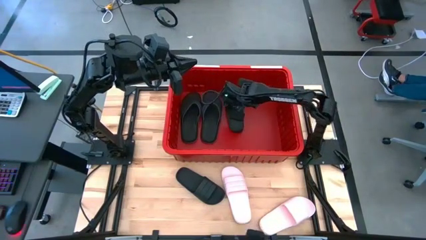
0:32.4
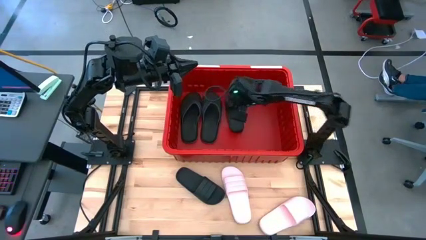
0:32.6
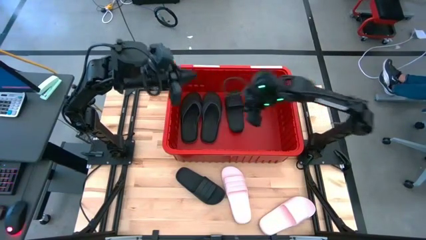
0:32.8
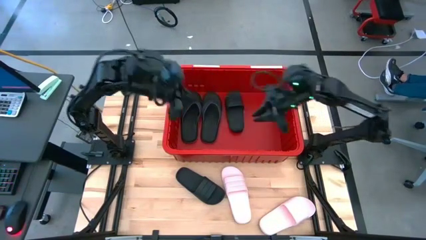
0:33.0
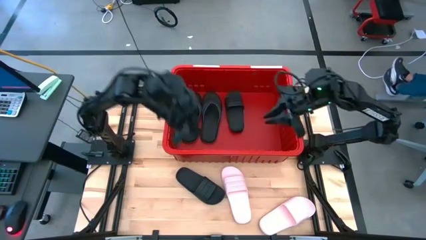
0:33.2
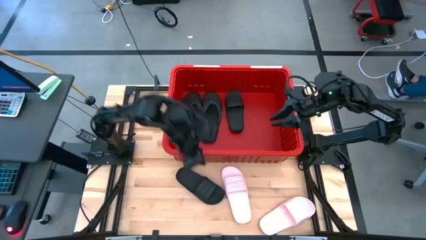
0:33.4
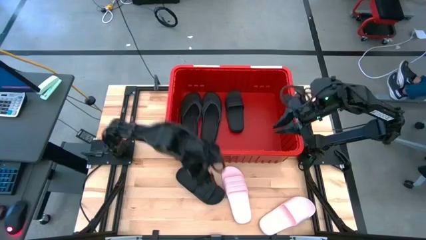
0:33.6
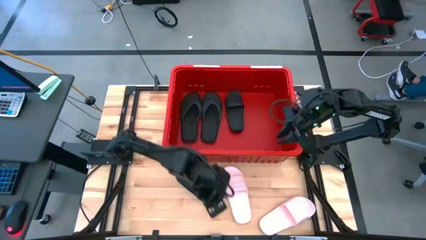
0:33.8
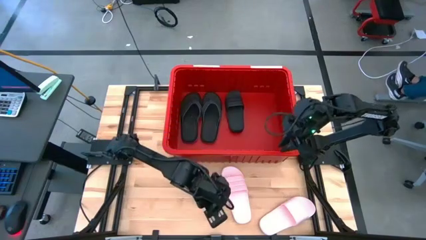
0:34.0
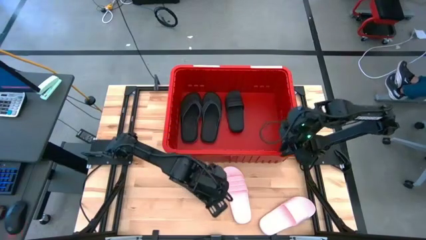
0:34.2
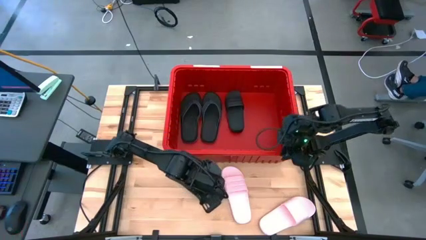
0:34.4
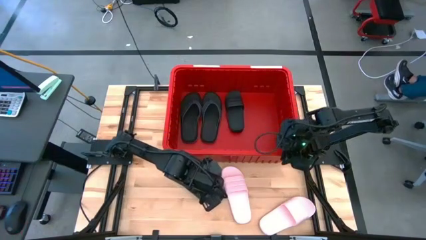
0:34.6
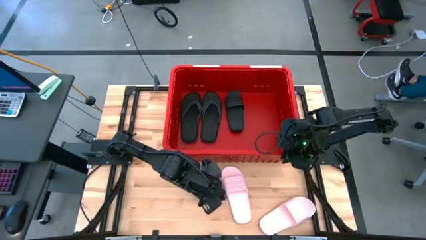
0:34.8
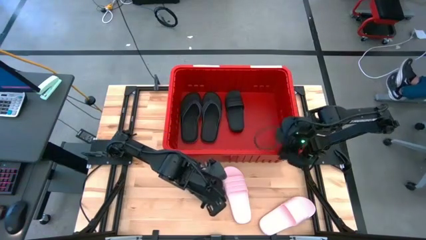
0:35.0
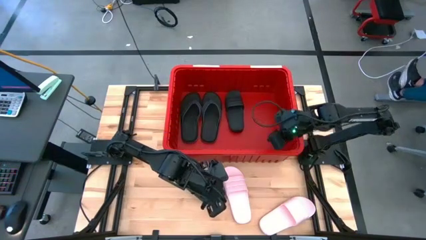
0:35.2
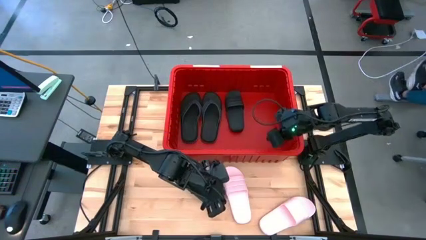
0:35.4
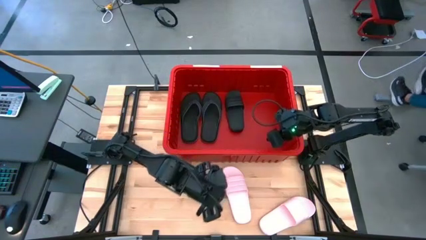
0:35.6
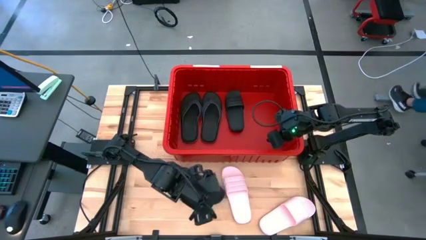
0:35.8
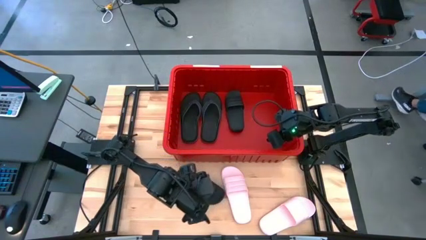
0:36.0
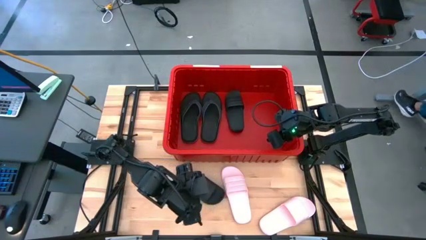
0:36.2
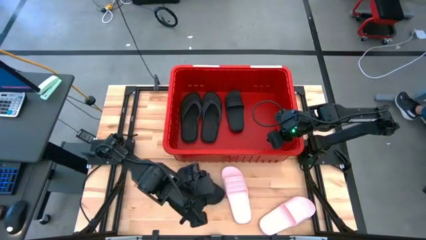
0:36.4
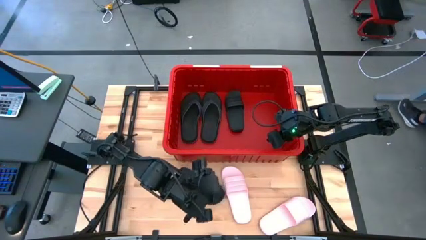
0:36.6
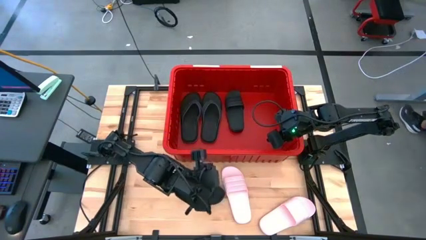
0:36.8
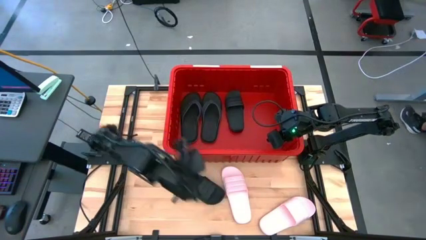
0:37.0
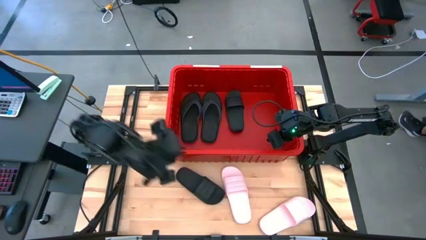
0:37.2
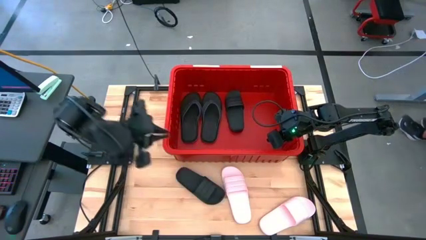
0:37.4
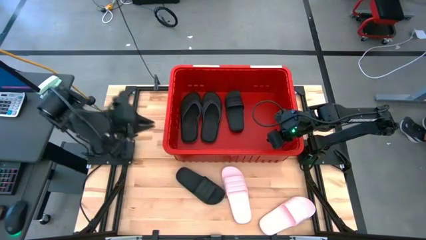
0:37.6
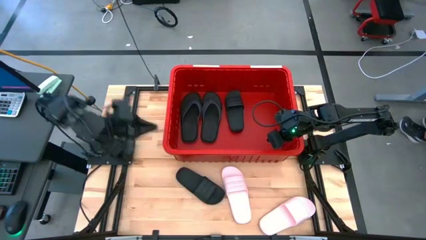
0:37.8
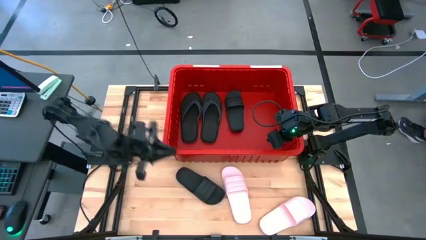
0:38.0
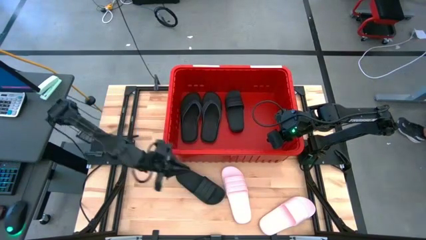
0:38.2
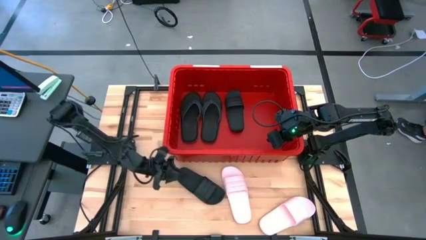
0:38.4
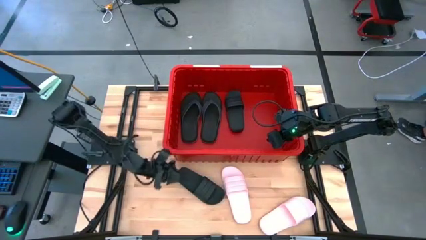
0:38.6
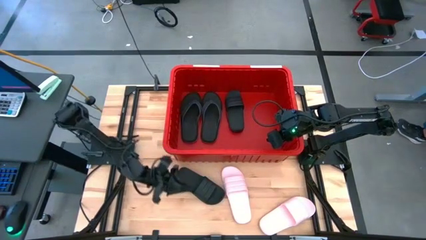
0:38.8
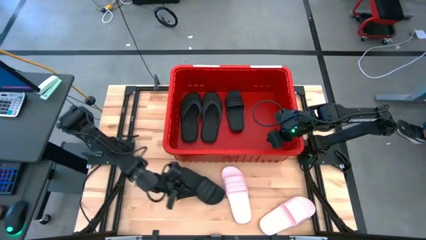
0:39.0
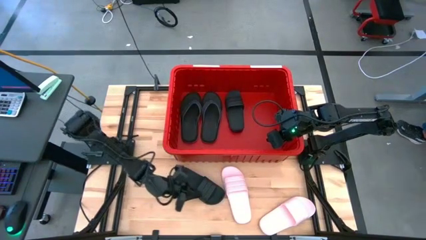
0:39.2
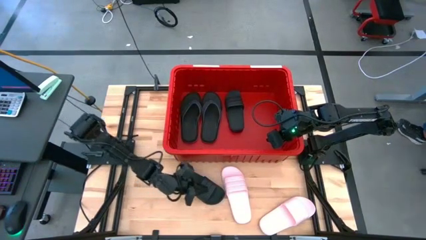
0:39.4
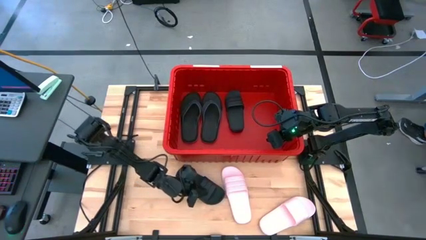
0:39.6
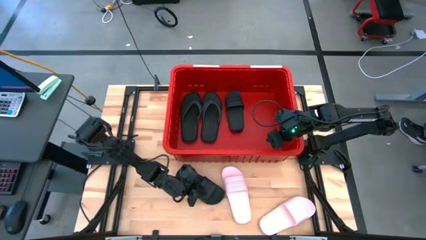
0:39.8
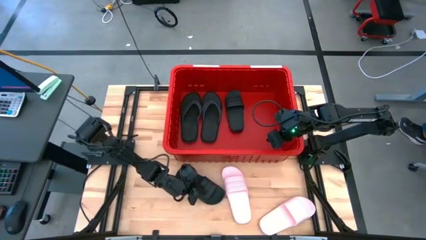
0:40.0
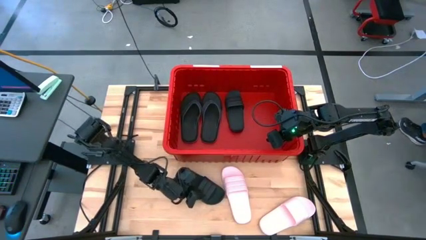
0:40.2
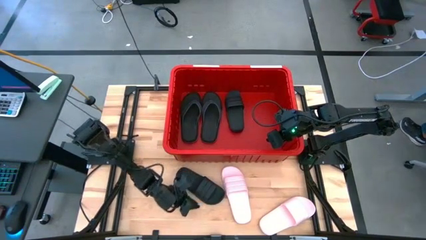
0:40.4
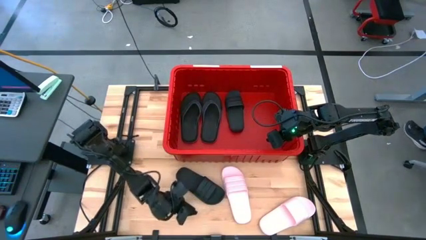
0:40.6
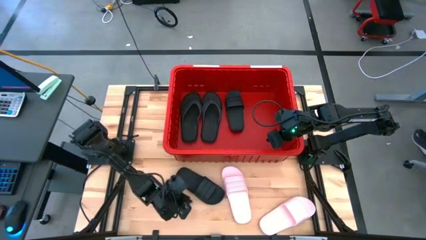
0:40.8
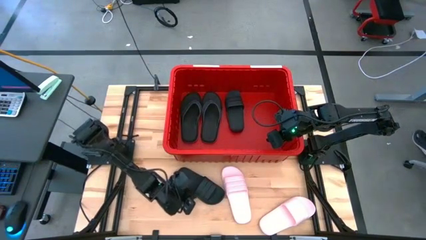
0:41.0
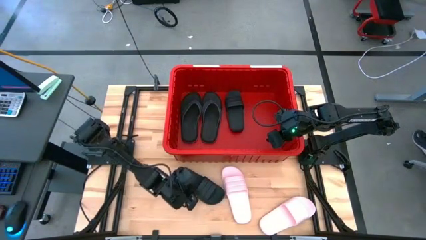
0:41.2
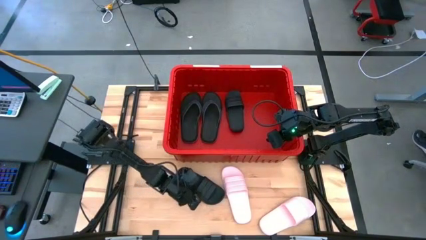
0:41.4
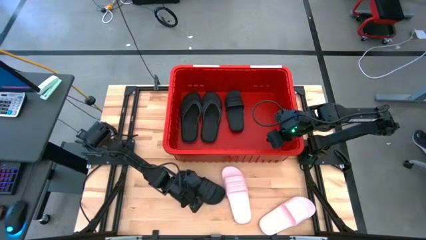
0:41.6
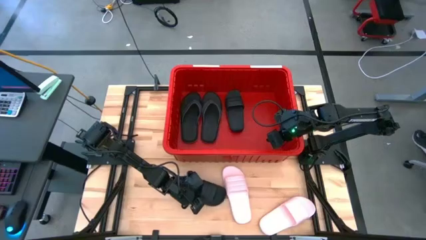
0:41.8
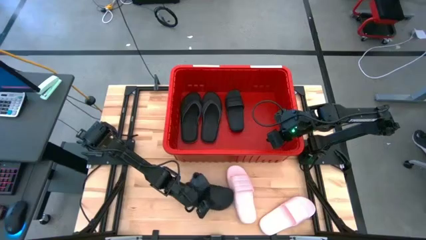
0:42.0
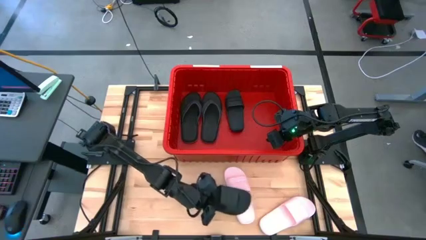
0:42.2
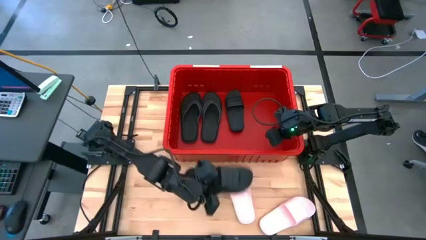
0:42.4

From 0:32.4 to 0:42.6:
Task: Pick and place slides into bin
Put the black slide into the red bin
